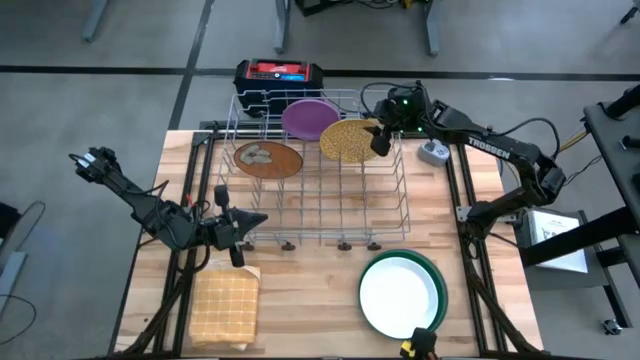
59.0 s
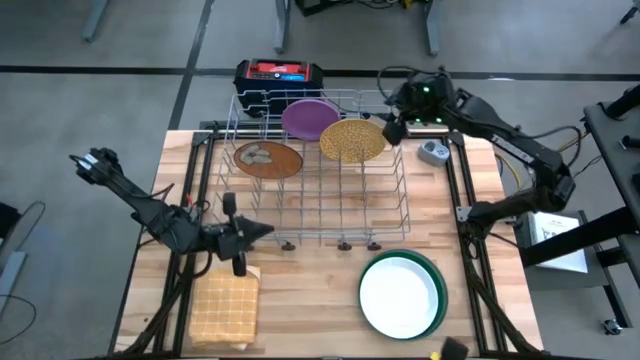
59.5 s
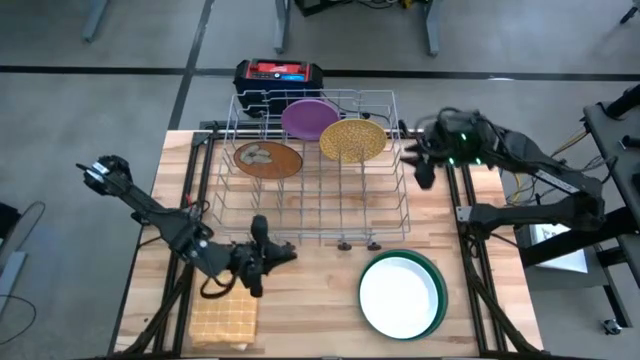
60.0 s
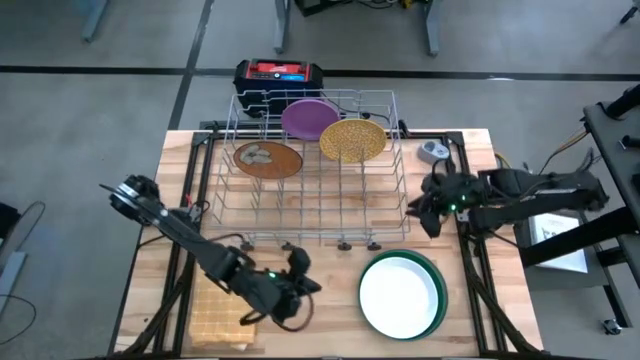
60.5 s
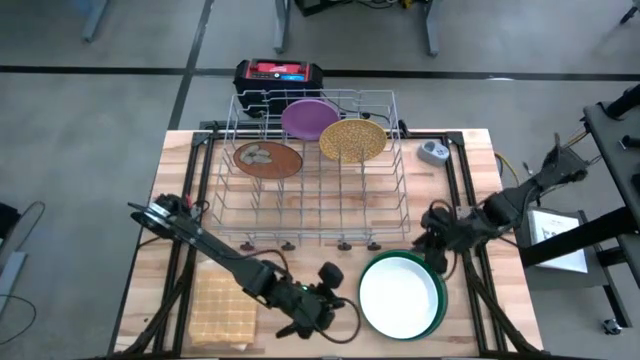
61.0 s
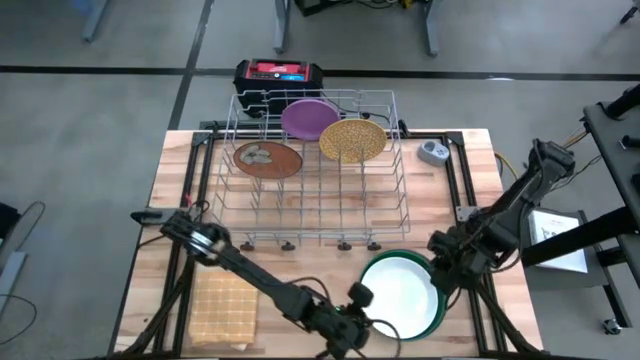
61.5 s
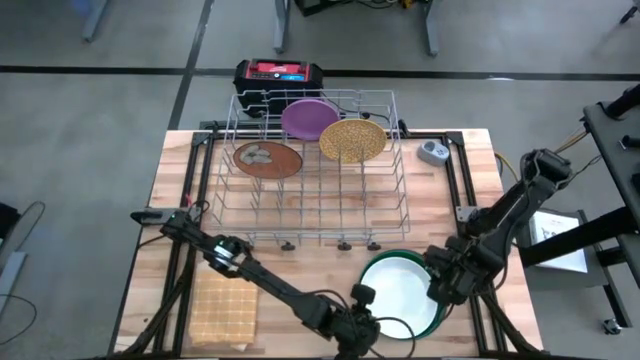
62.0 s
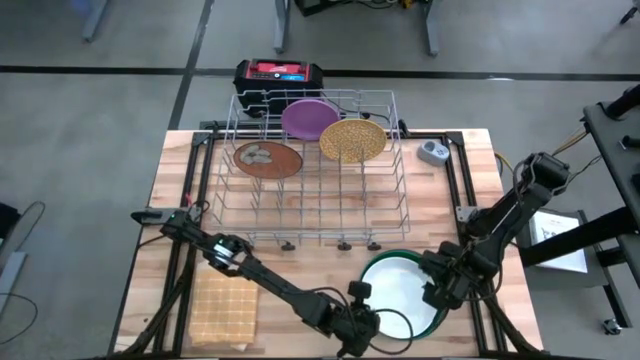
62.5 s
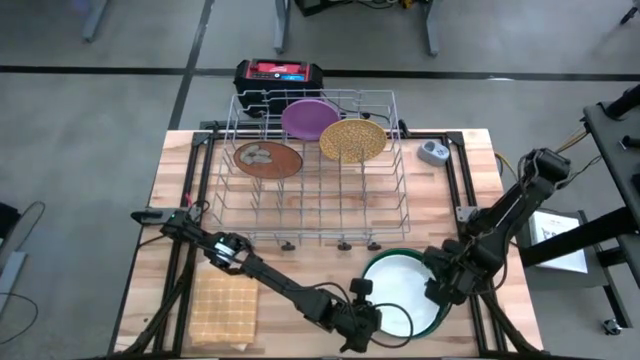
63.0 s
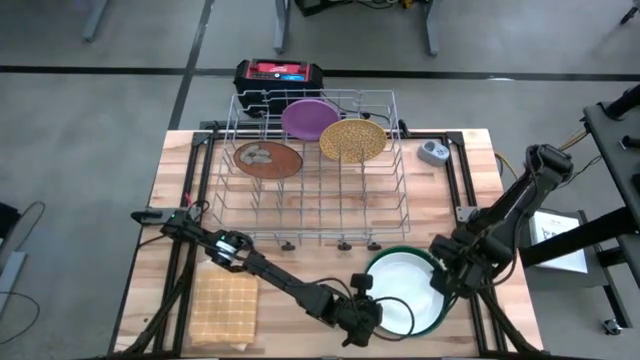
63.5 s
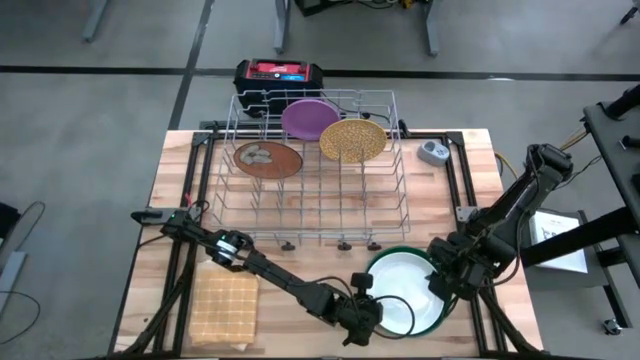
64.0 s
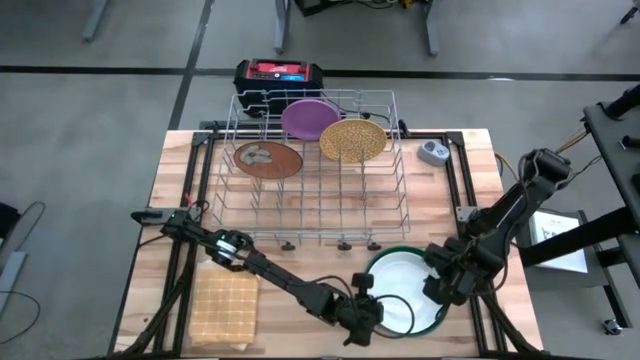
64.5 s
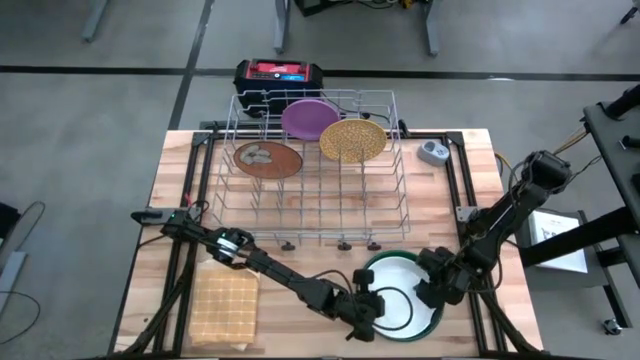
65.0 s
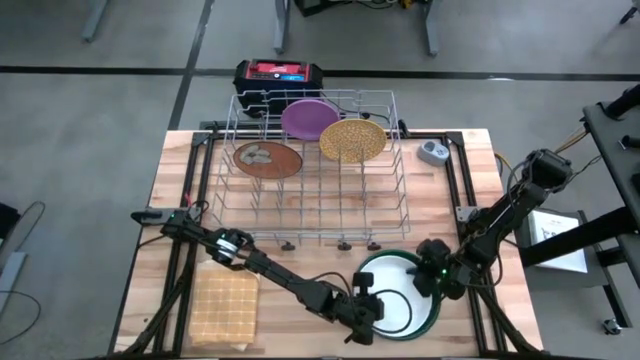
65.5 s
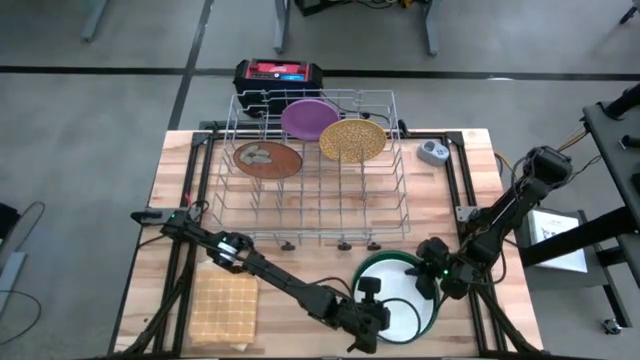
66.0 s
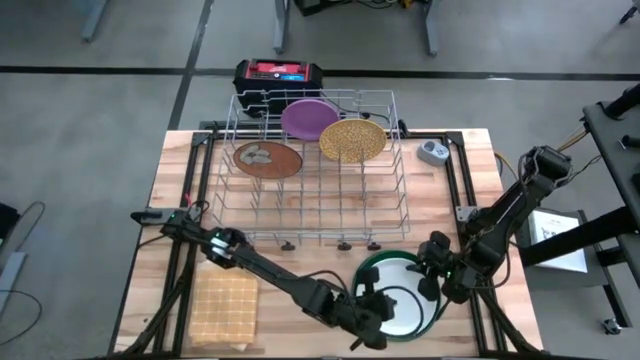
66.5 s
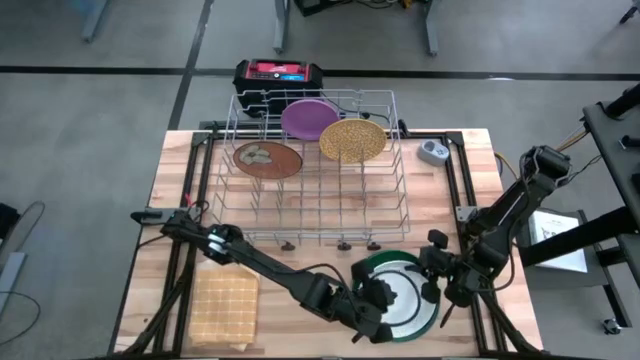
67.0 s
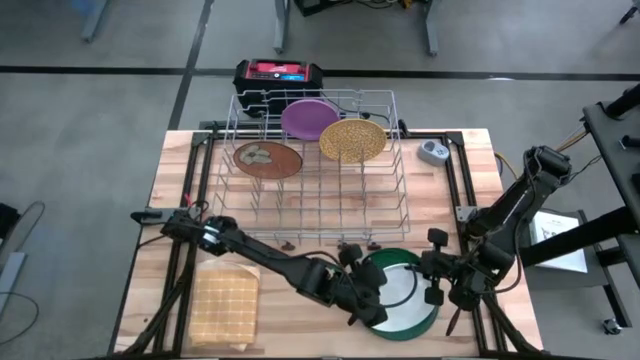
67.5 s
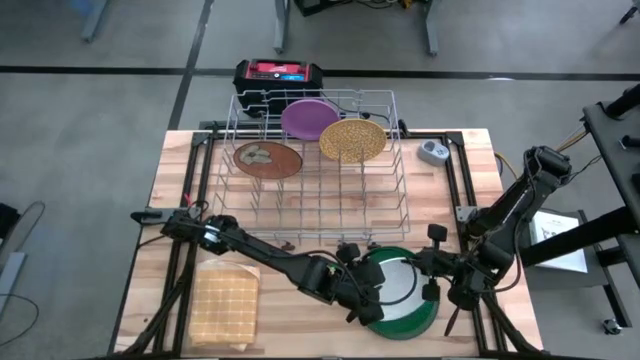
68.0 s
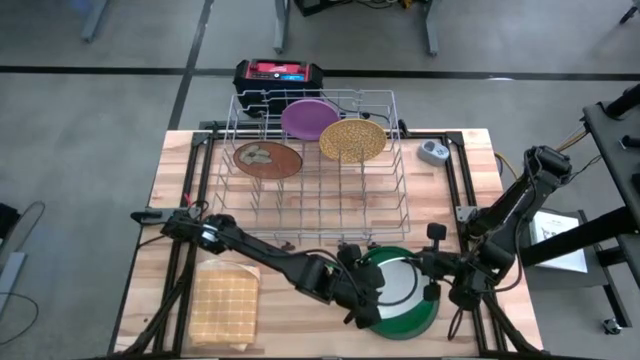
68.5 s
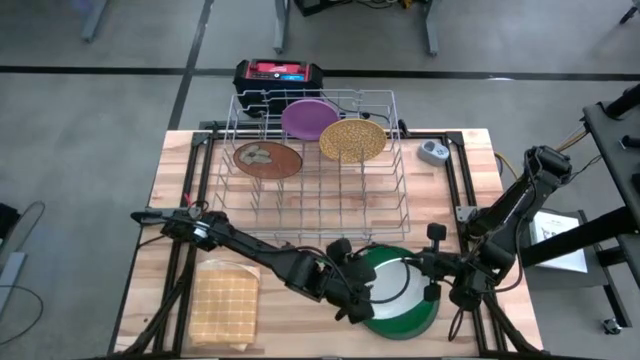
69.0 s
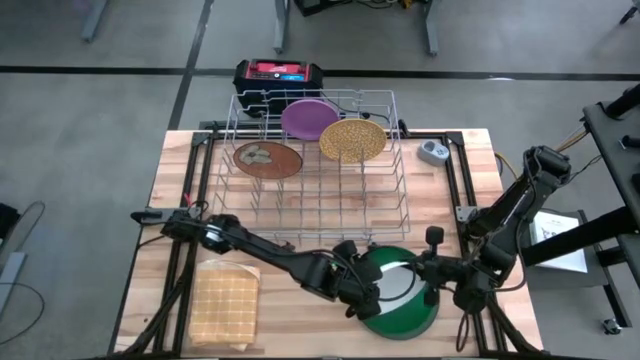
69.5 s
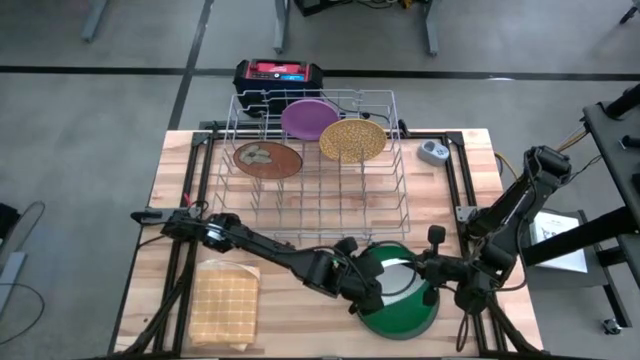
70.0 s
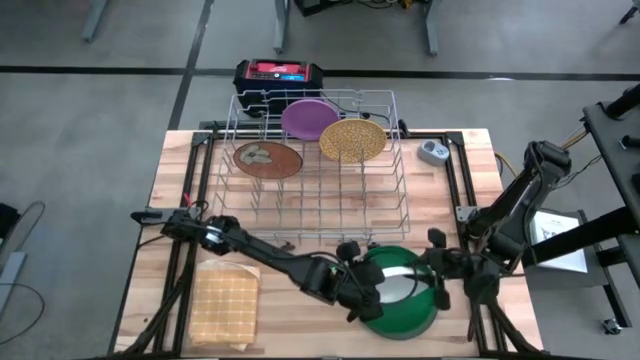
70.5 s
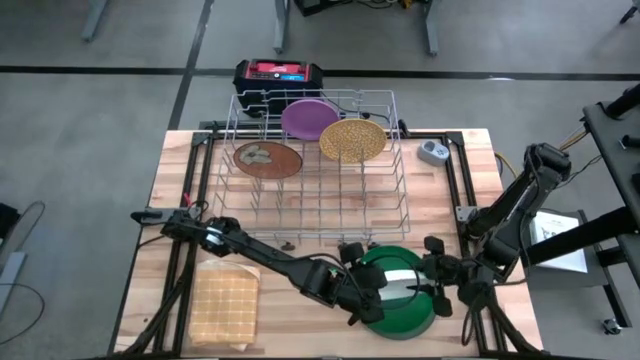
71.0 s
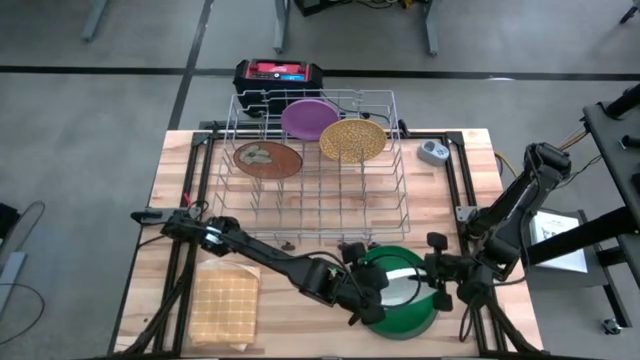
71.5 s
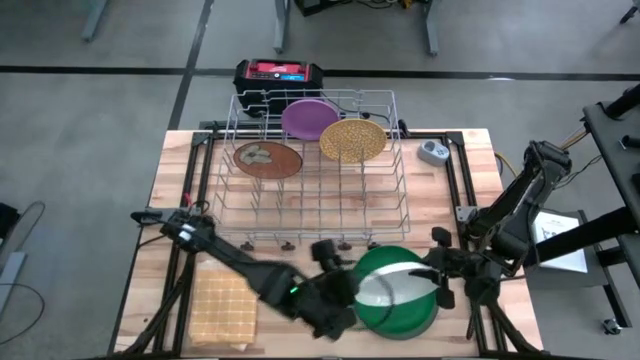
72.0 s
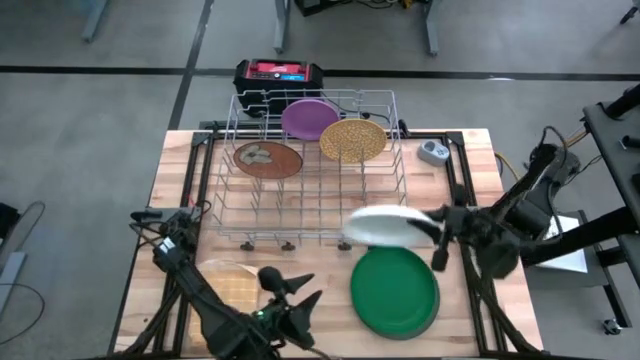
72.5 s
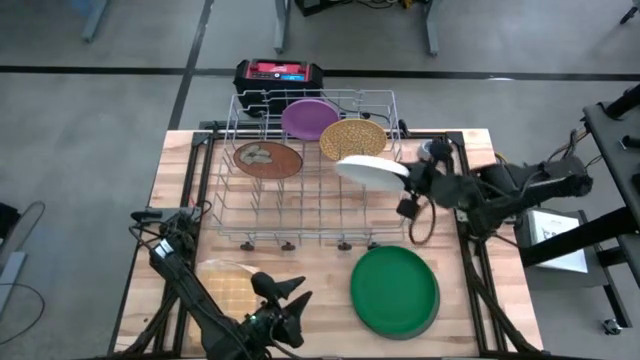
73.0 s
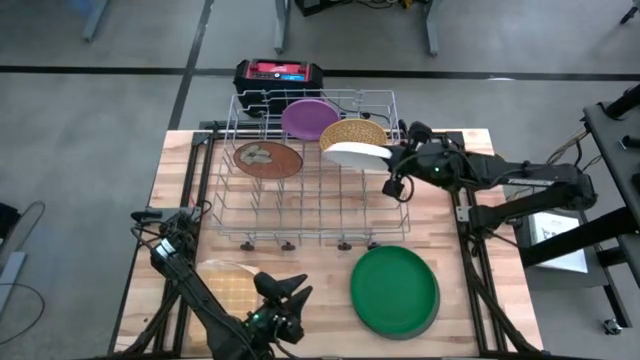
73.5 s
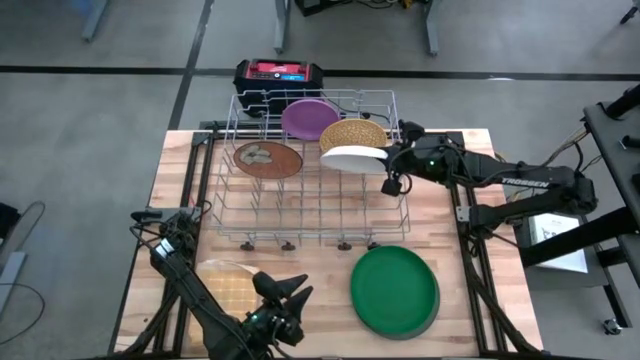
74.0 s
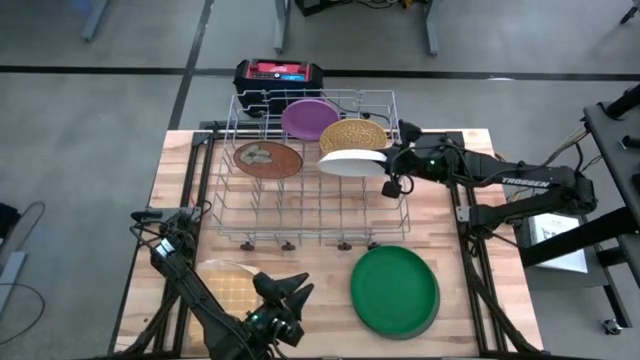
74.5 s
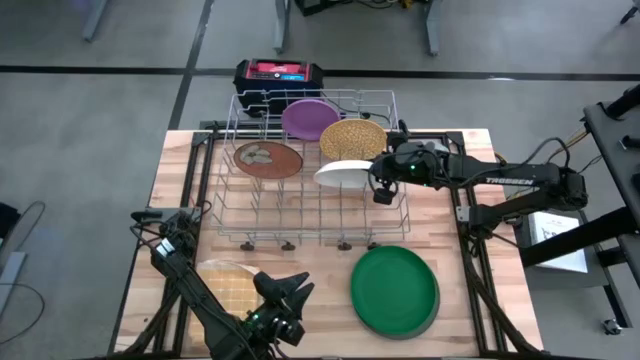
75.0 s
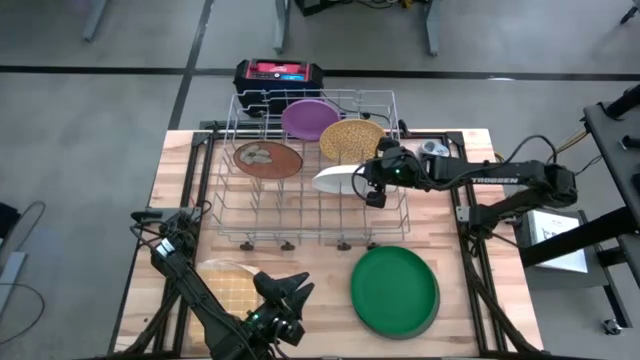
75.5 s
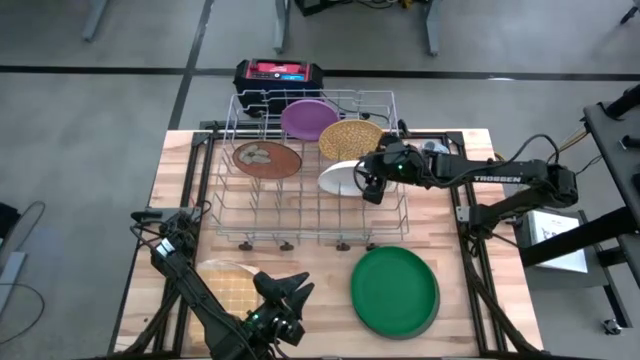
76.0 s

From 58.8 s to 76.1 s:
Task: Sort dishes
Put the white plate into the dish rack
